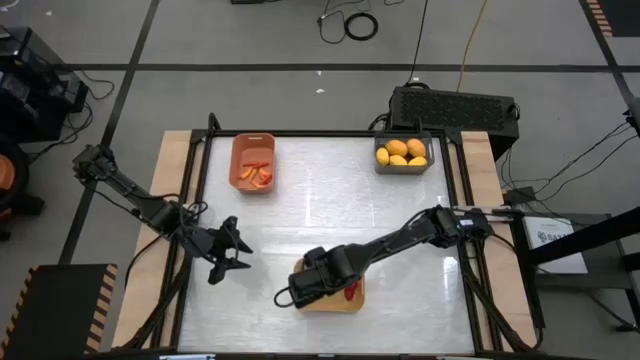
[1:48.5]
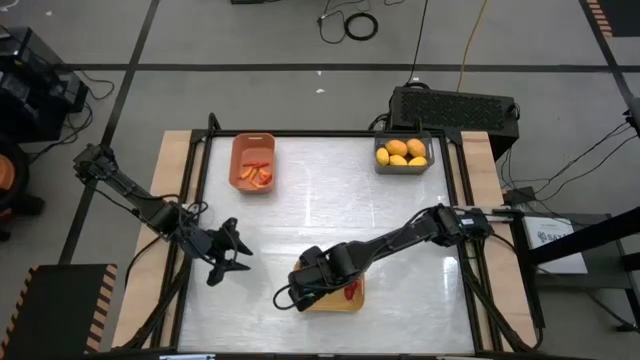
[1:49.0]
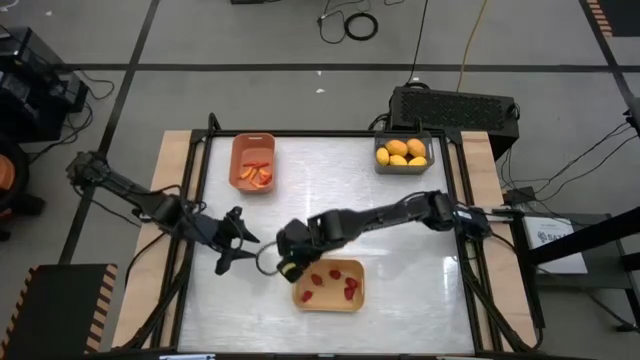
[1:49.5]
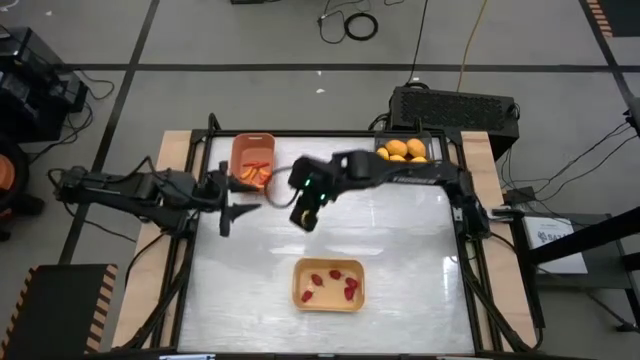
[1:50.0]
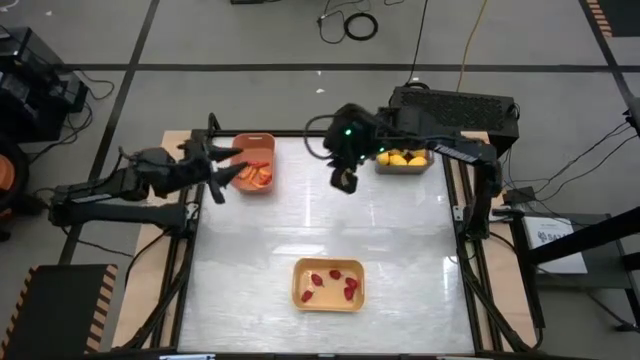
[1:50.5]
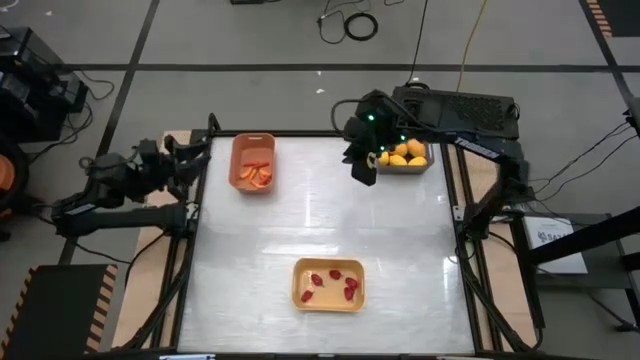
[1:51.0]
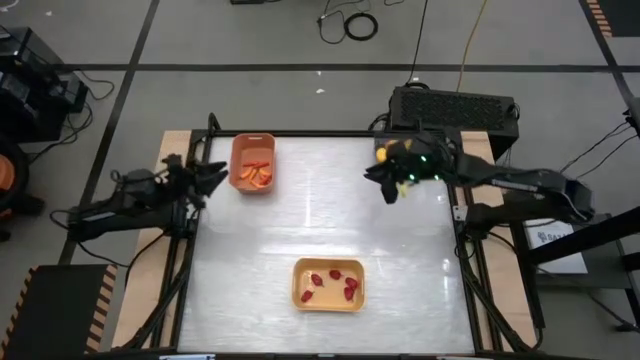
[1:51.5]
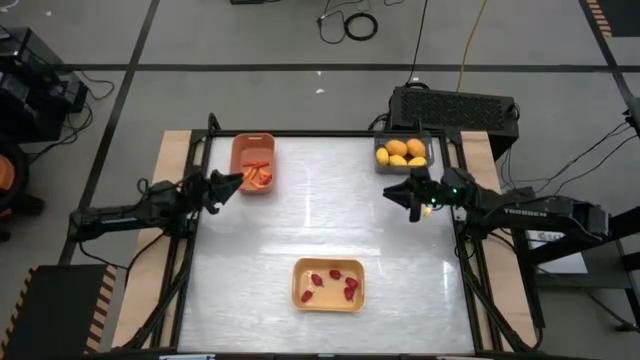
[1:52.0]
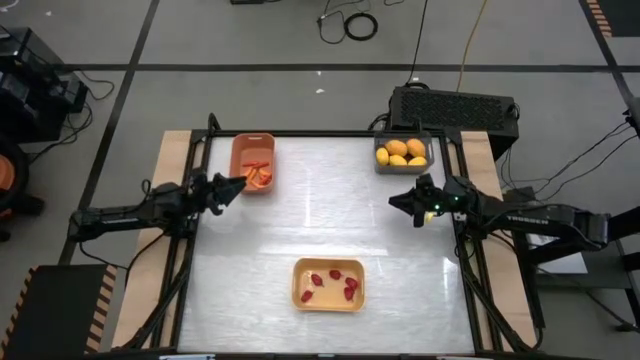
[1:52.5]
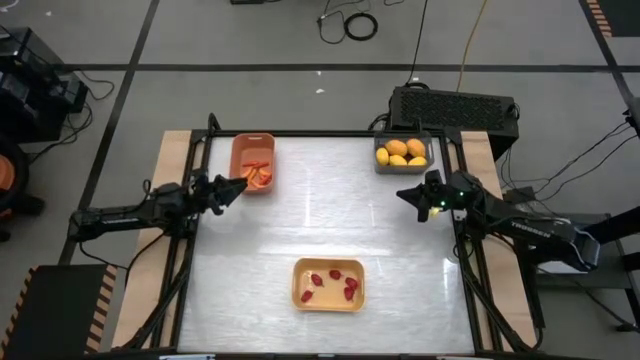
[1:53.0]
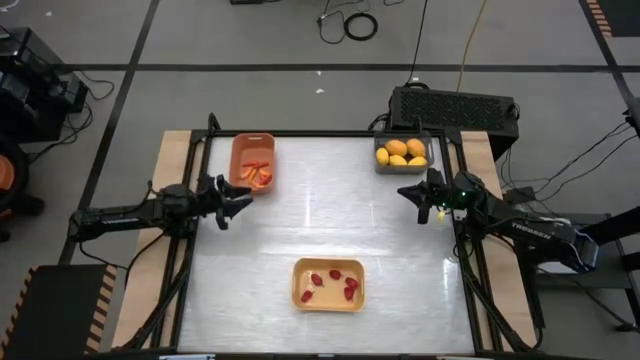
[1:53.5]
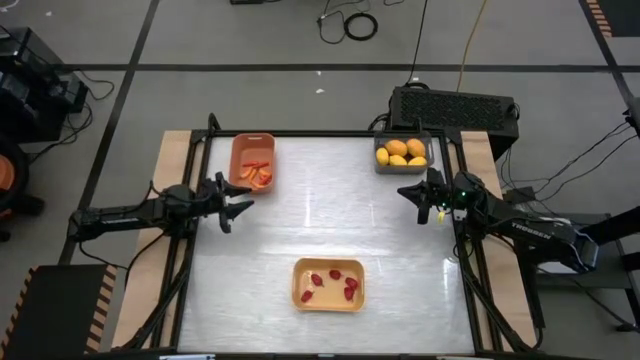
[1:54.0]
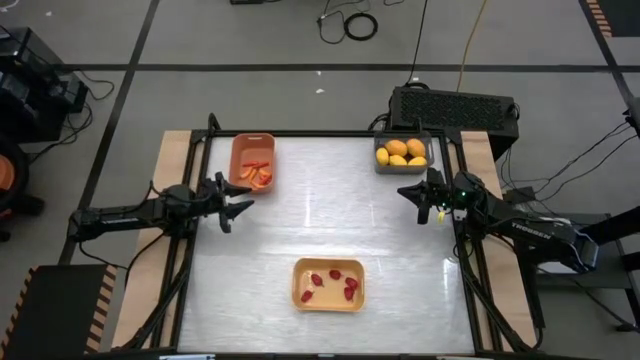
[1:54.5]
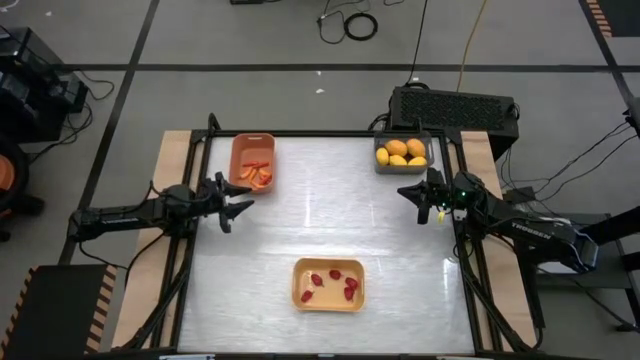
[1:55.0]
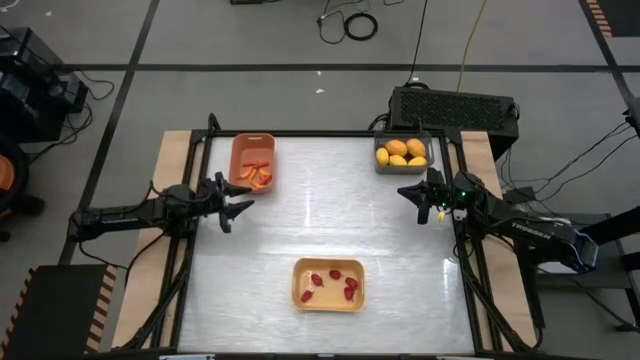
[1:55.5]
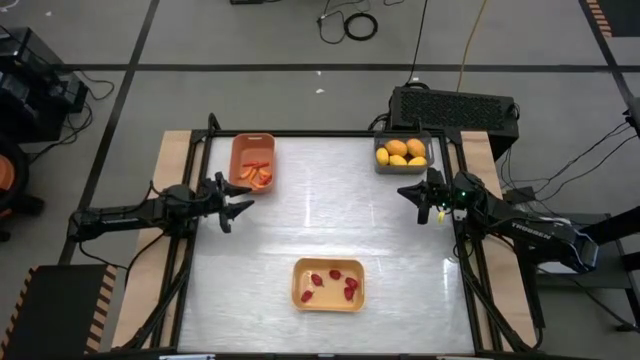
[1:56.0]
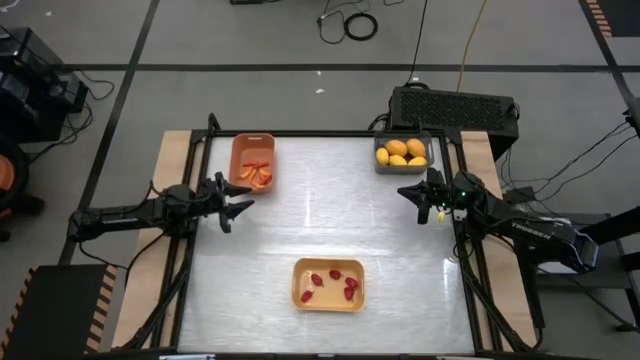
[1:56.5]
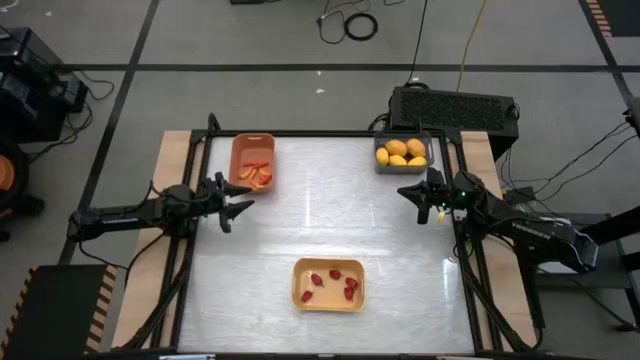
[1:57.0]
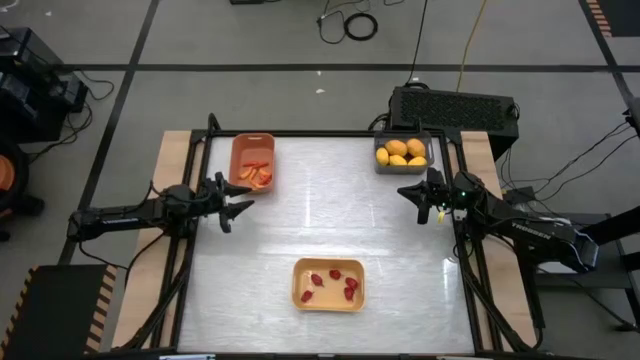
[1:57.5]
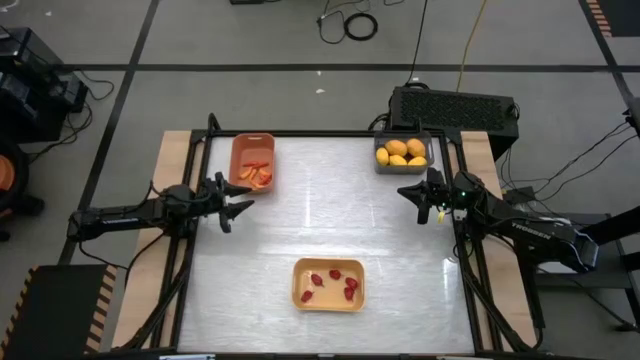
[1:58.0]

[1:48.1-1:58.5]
Task: Sort produce into baskets
Return to Home Position

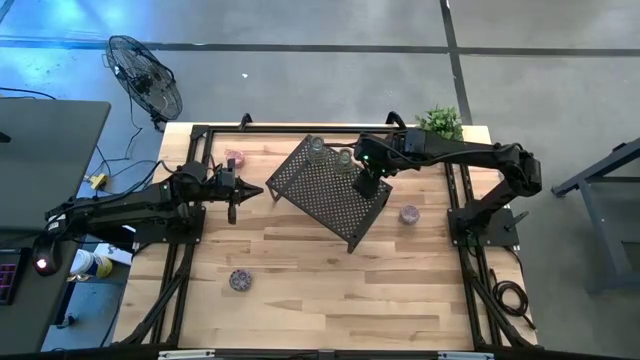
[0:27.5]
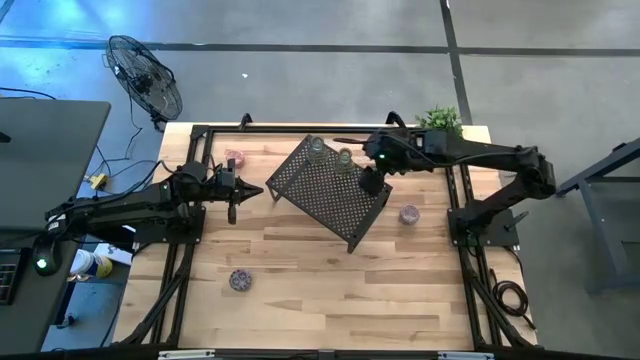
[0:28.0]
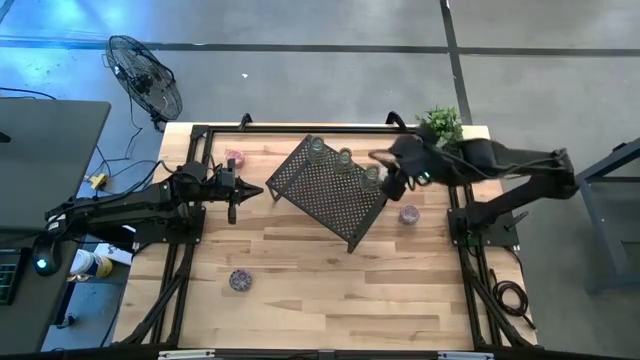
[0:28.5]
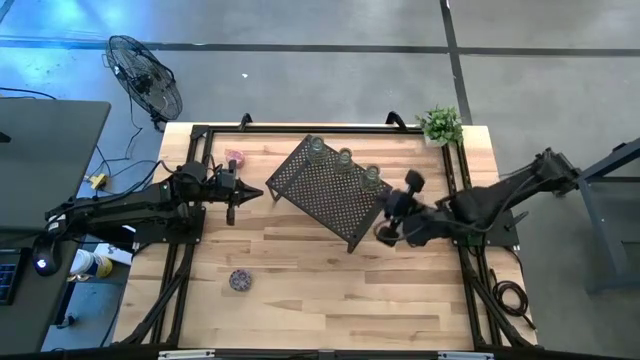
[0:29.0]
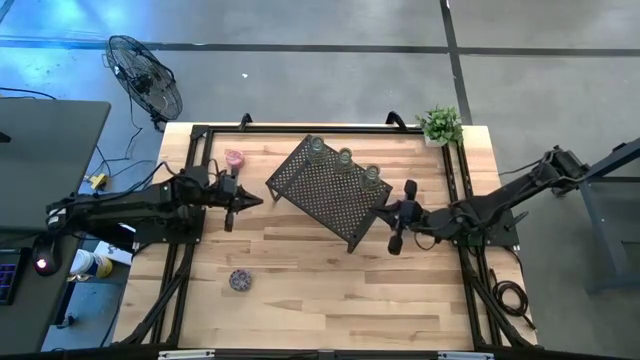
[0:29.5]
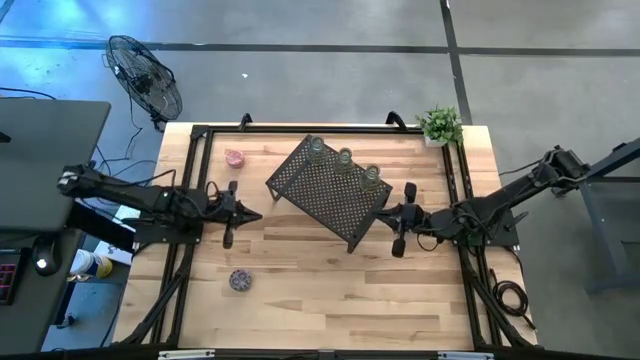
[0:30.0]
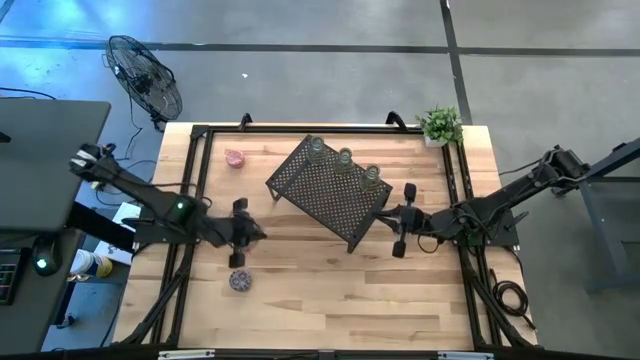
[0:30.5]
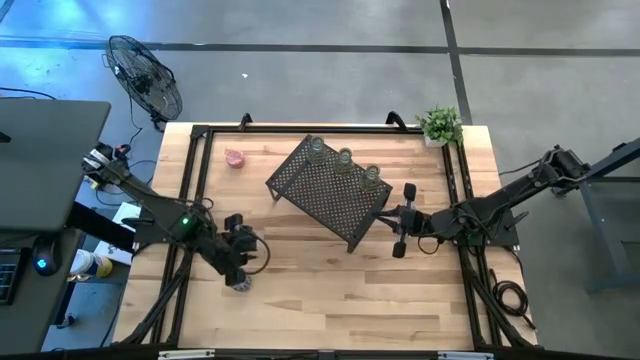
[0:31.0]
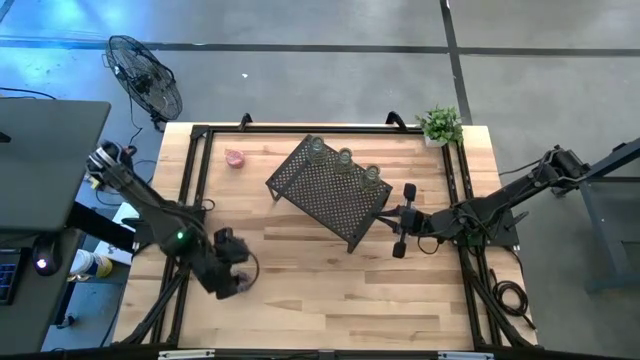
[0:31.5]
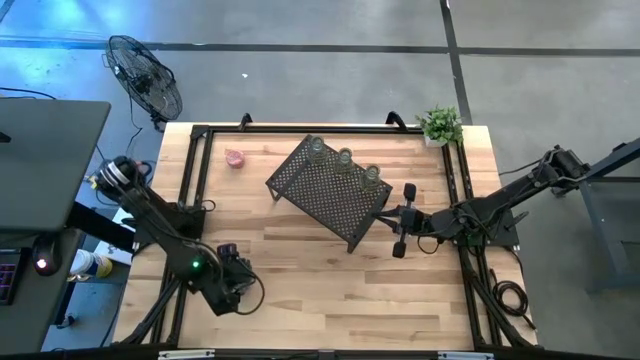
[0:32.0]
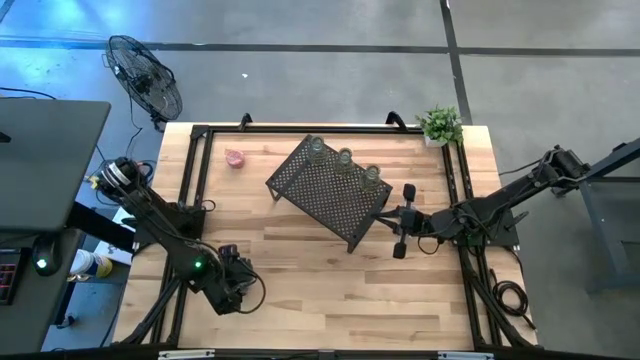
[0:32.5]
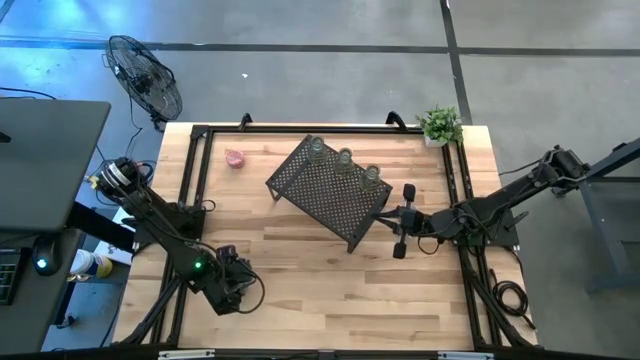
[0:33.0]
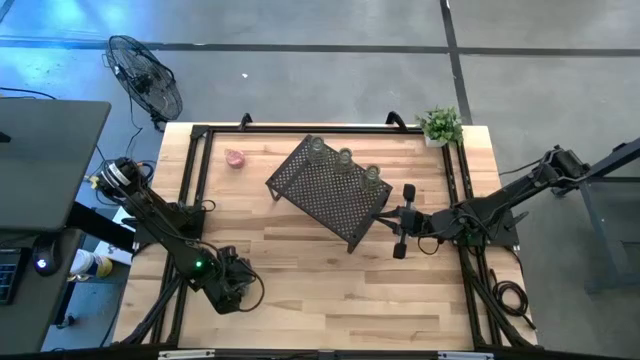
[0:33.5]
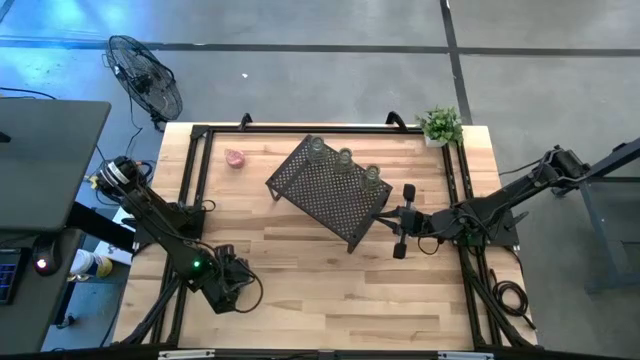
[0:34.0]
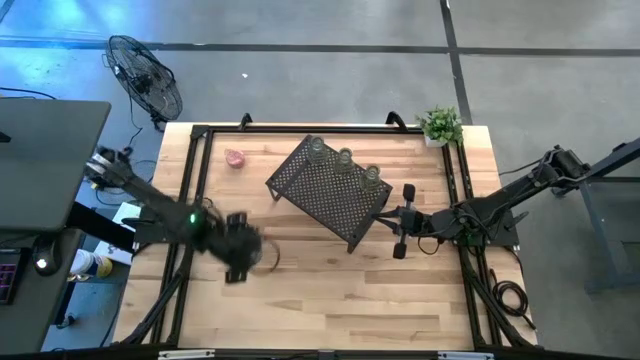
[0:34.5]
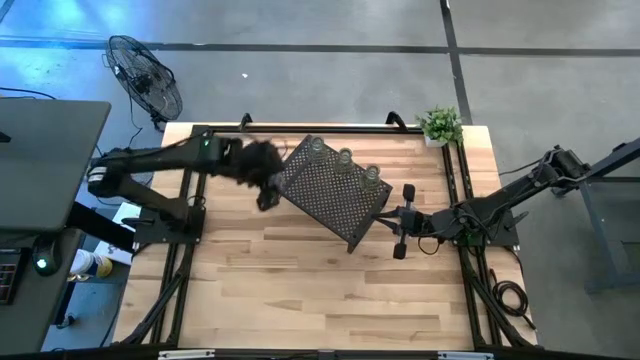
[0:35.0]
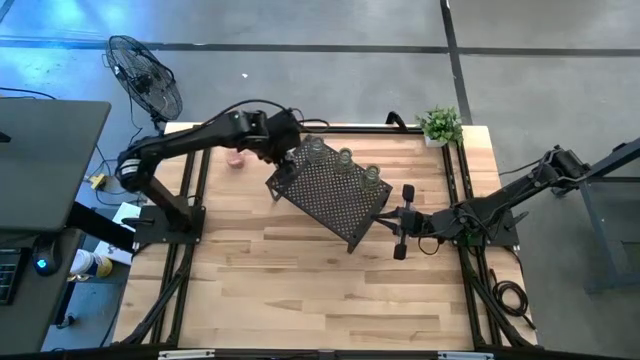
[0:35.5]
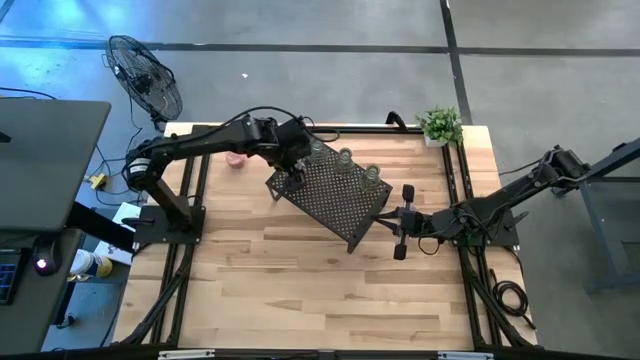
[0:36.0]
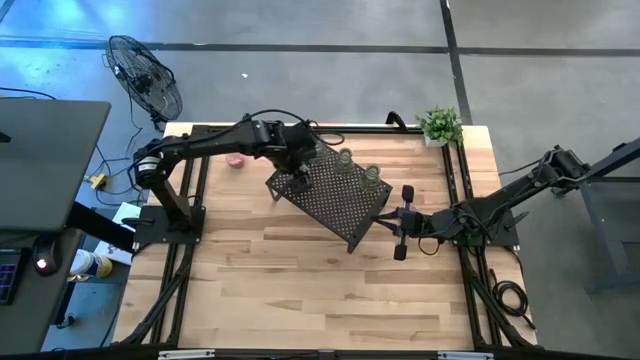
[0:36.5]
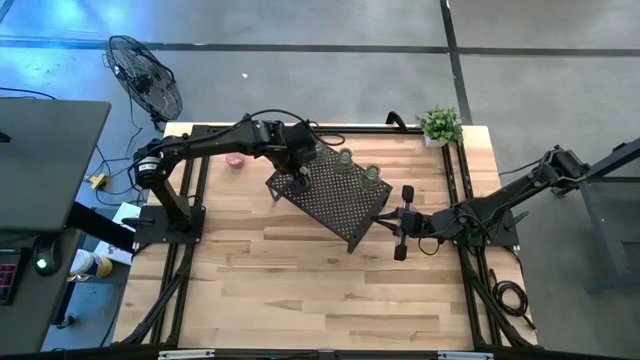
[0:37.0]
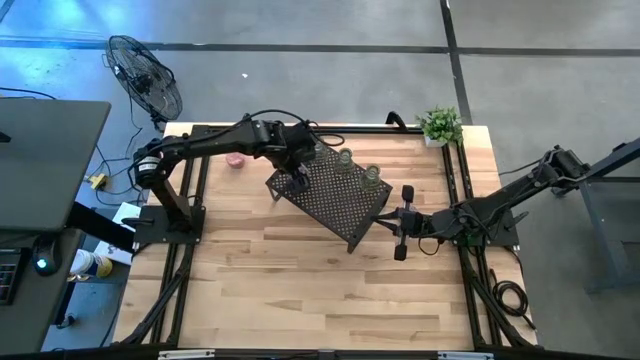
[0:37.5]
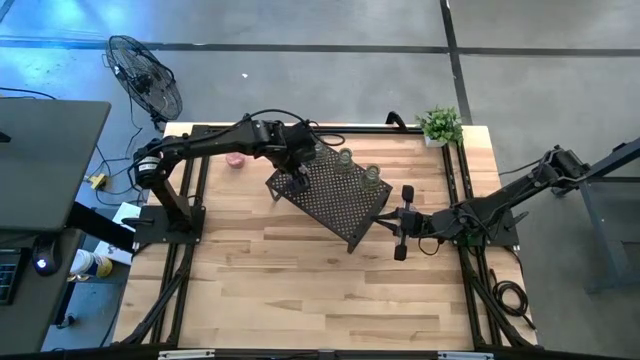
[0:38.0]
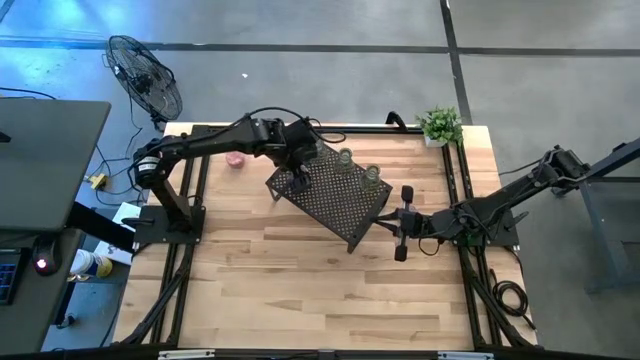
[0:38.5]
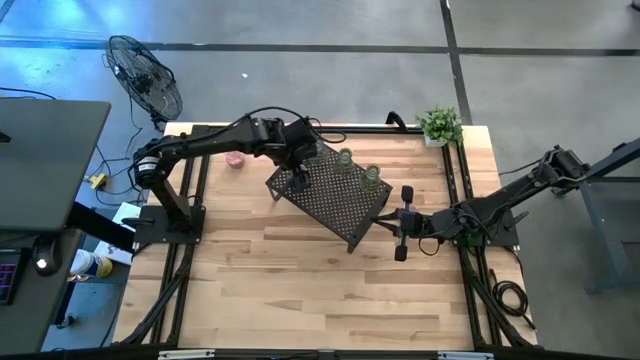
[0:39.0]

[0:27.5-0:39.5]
Task: Pick & Place candle stick holders
Put the black scented candle on the shelf
